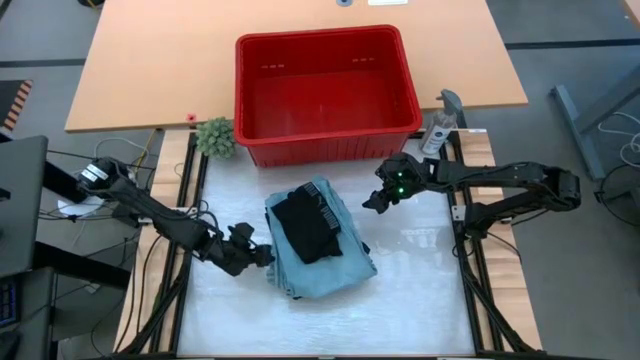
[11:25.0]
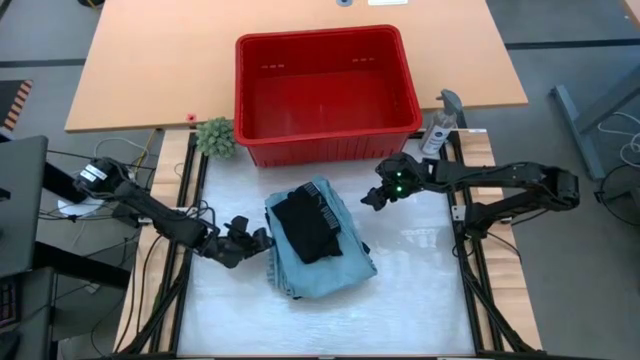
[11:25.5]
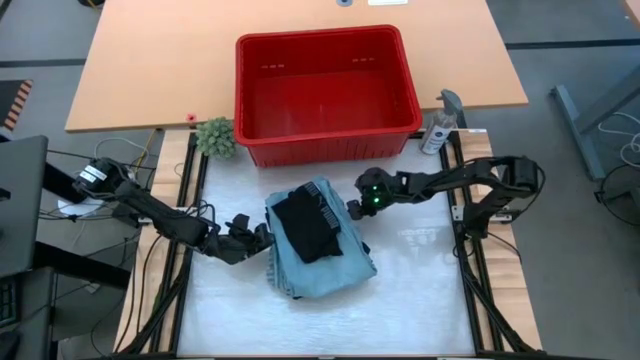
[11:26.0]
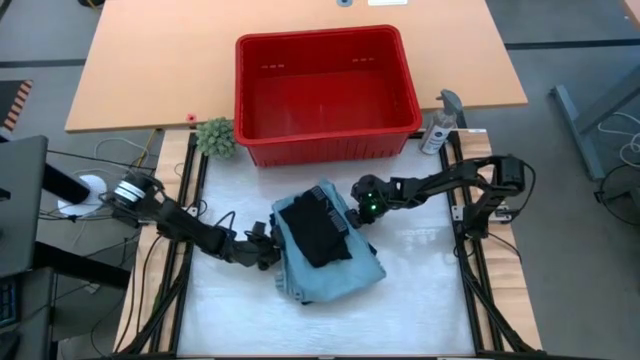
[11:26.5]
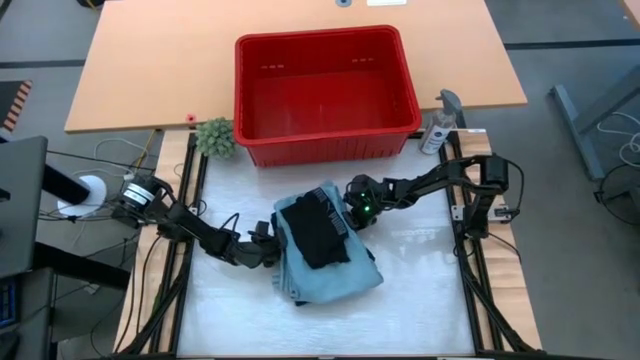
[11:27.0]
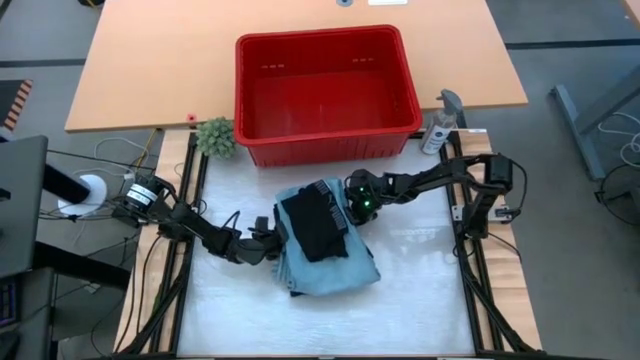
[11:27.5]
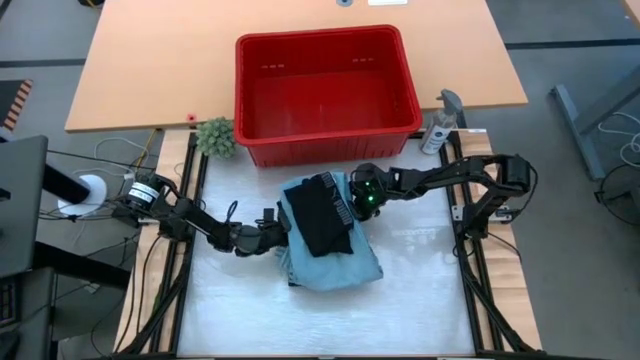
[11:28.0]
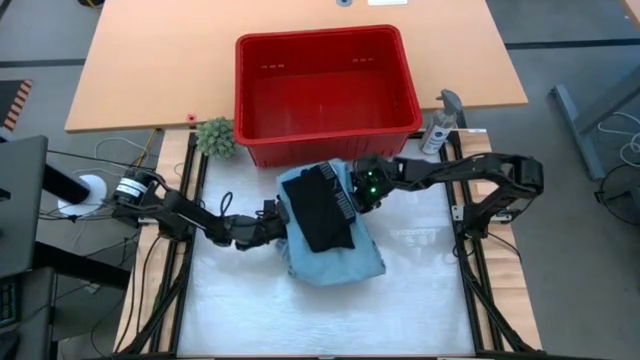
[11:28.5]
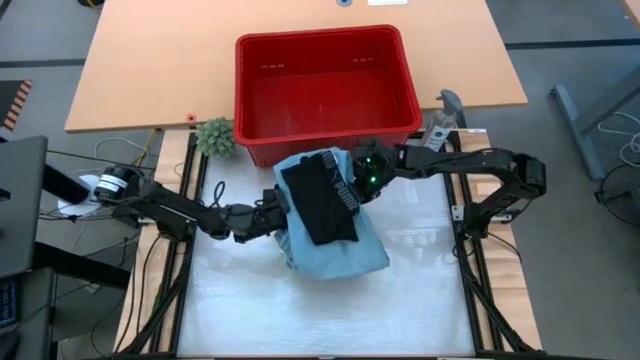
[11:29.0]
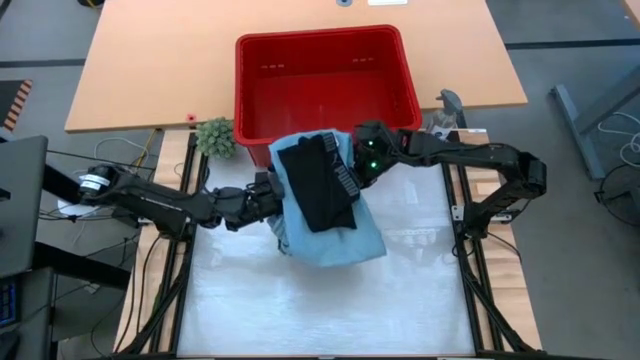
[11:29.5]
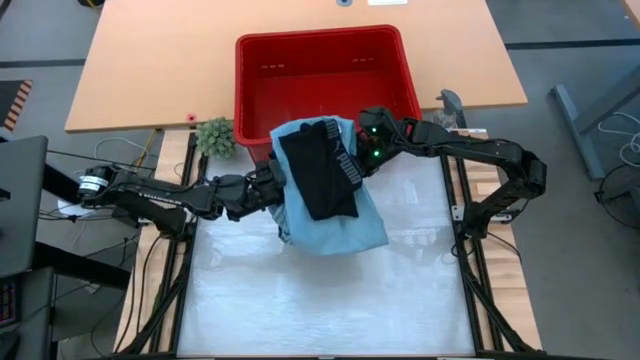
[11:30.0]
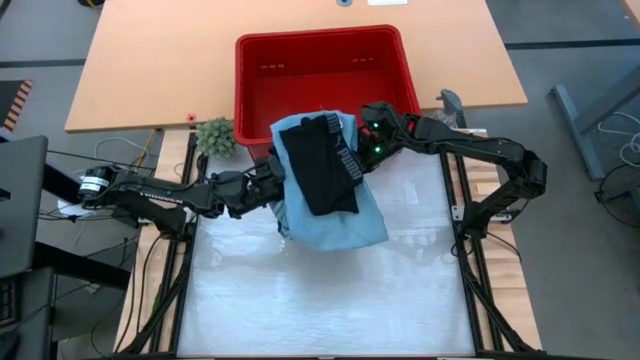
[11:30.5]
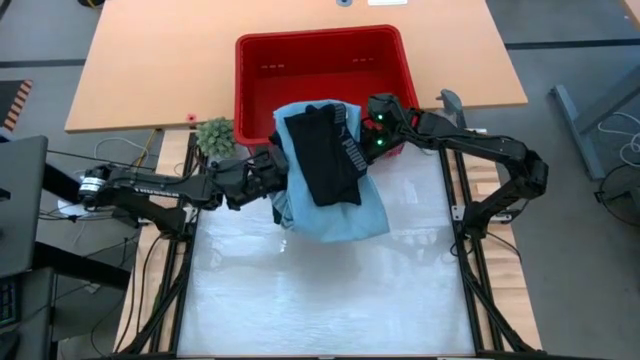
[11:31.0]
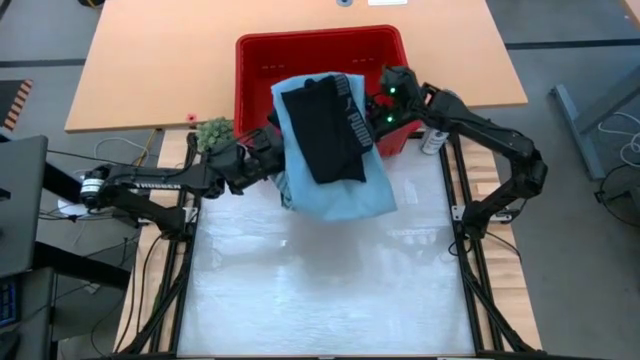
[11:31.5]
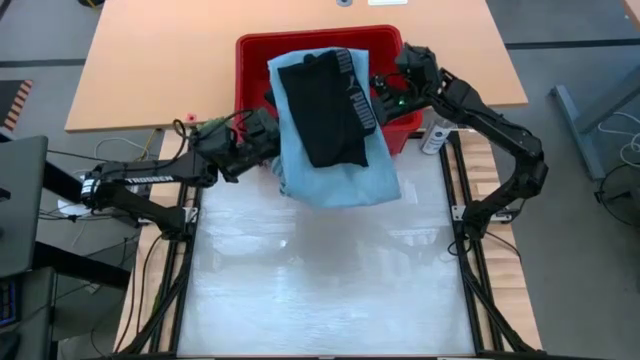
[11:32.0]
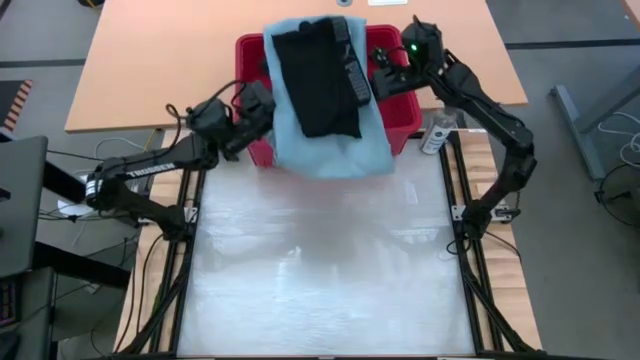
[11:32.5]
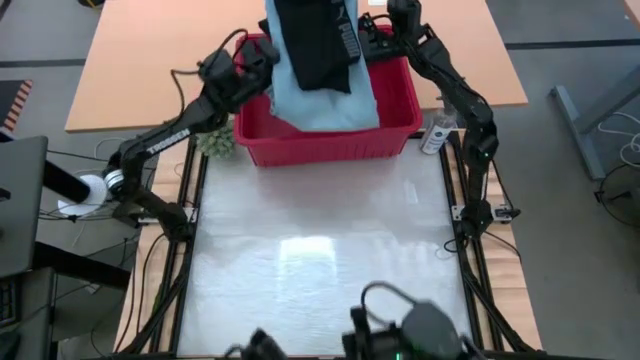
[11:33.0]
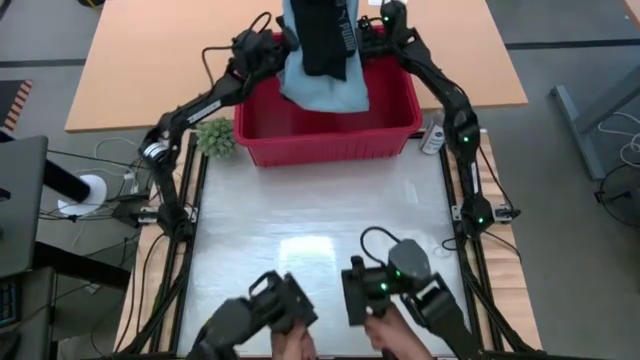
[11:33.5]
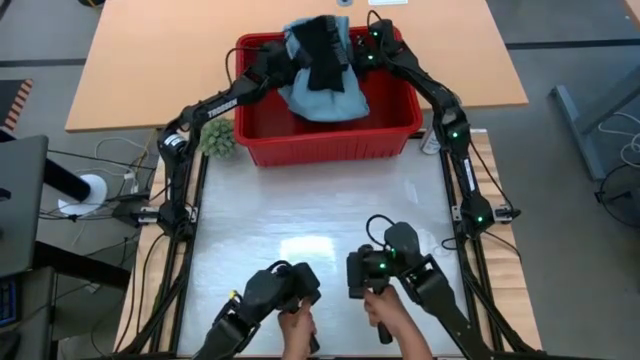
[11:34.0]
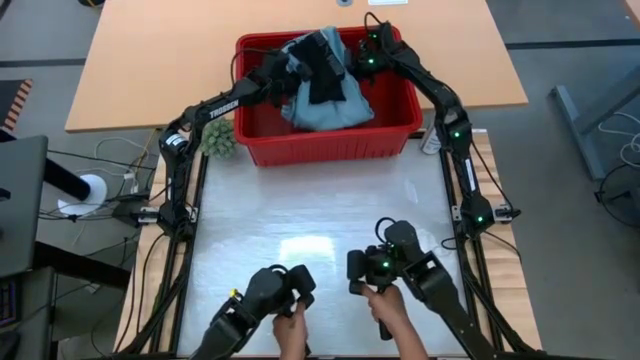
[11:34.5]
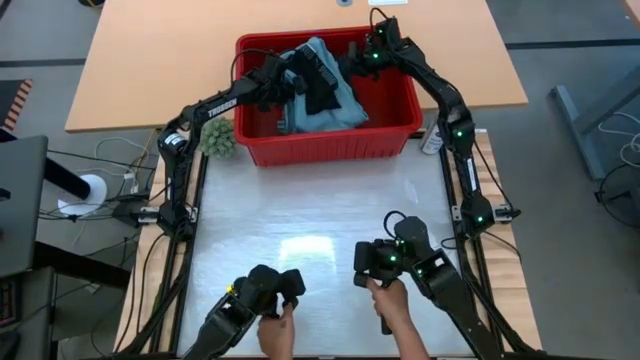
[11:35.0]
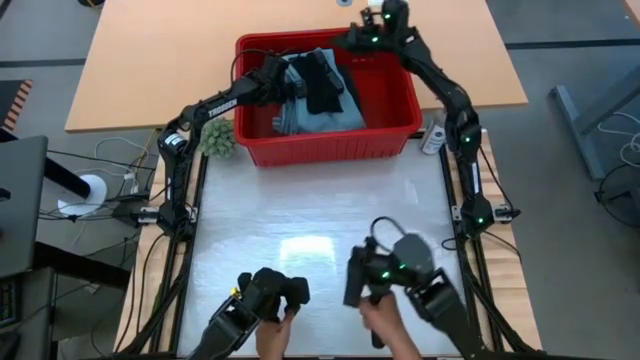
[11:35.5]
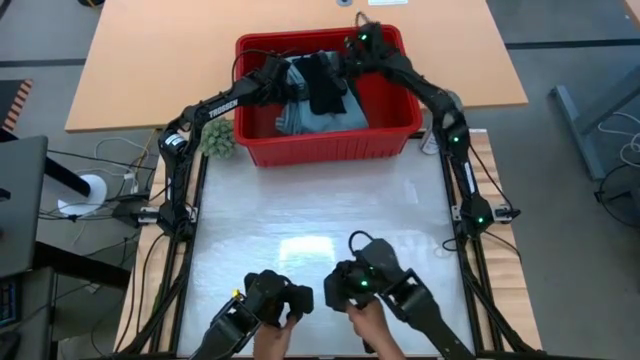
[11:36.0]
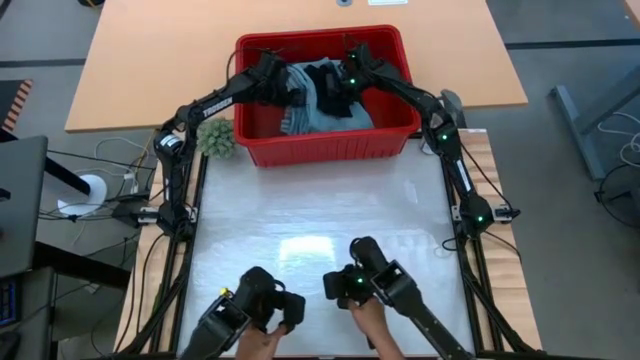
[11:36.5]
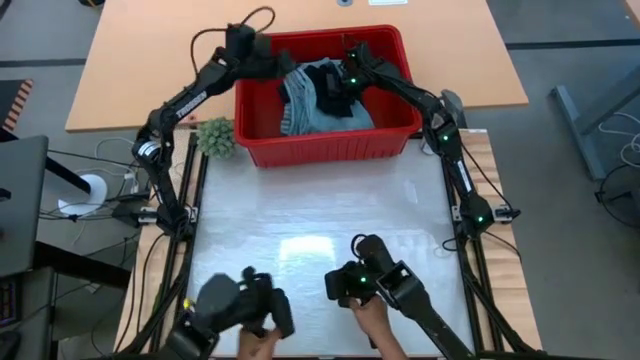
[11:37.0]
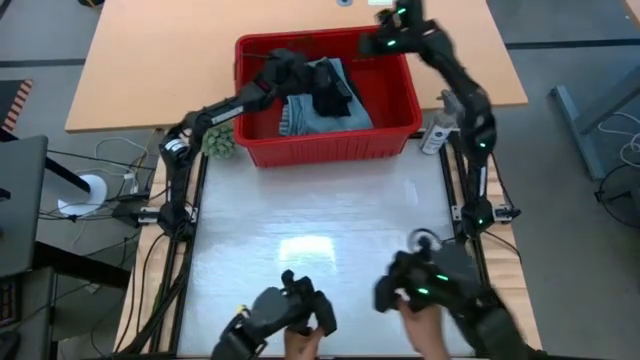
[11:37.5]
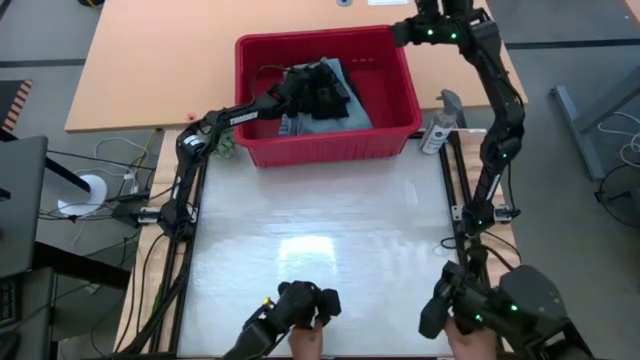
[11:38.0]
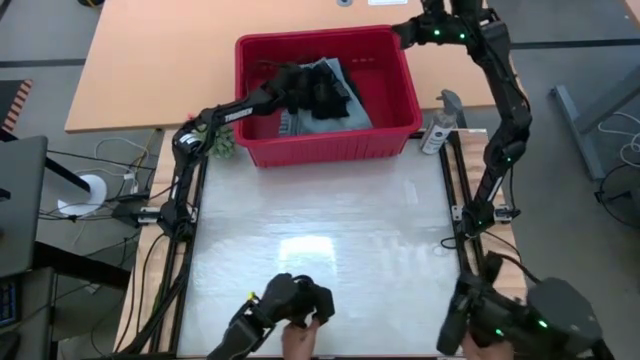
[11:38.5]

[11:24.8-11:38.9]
Task: Fold Laundry from Bin
Put the stacked clothes into the red laundry bin

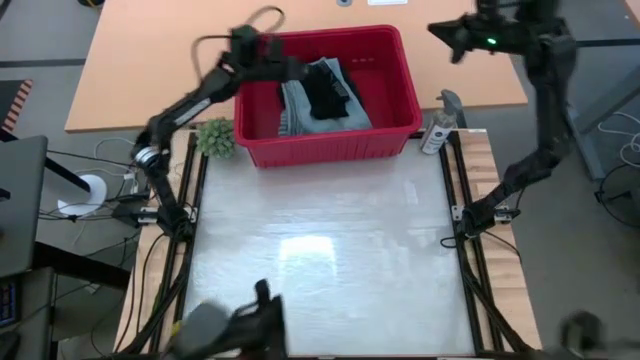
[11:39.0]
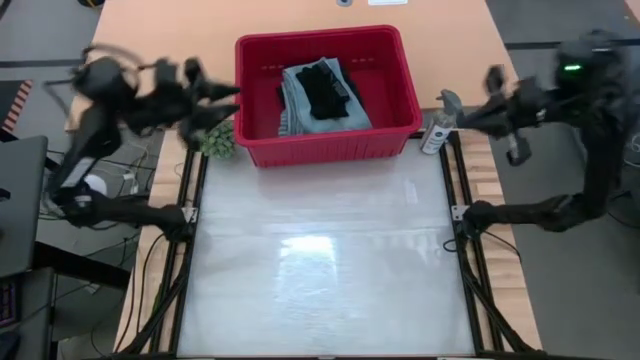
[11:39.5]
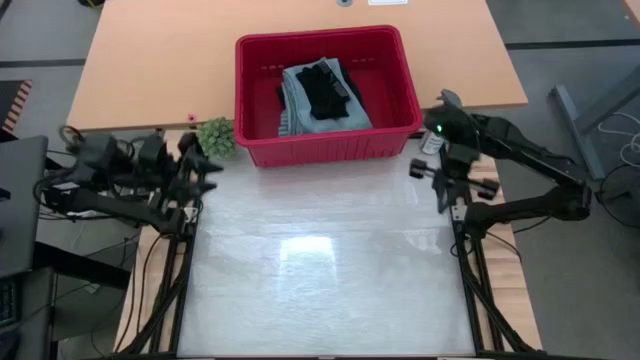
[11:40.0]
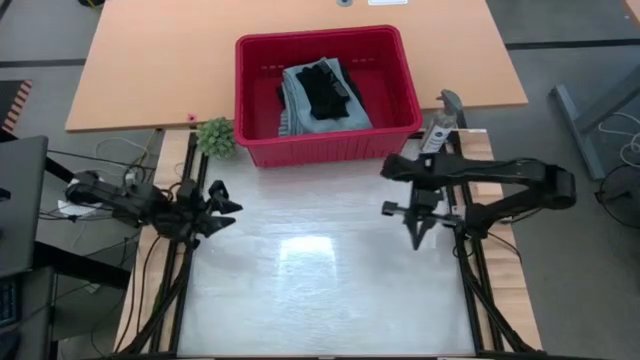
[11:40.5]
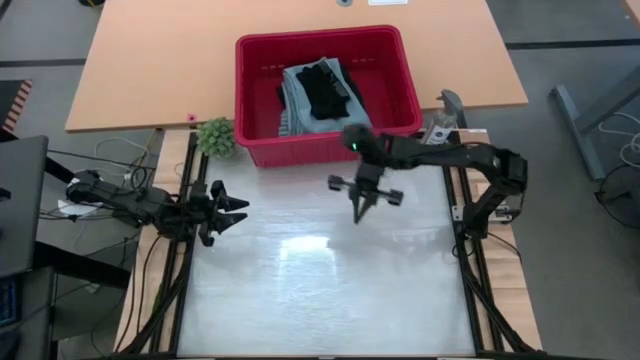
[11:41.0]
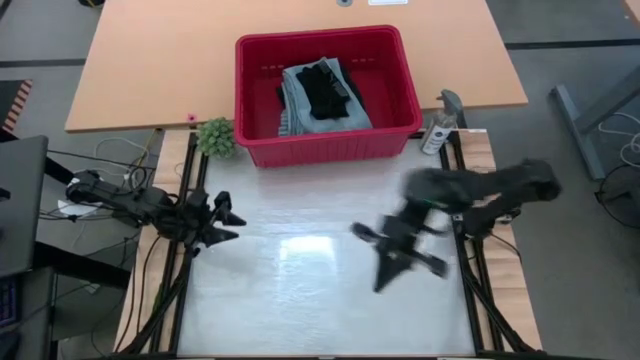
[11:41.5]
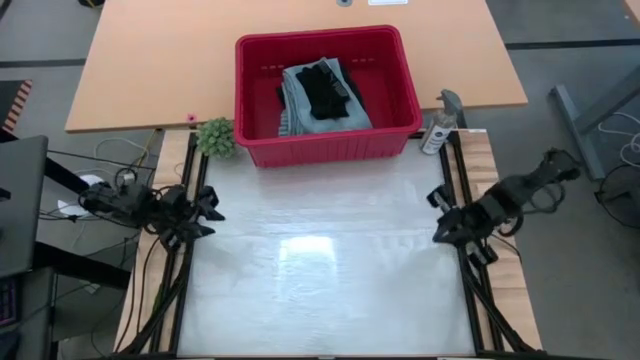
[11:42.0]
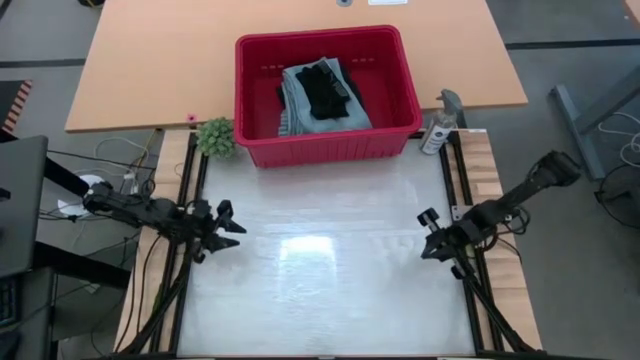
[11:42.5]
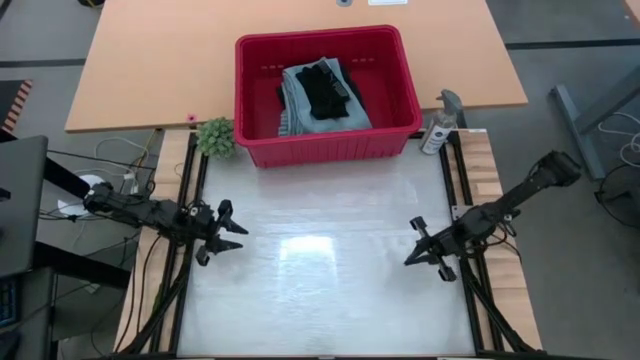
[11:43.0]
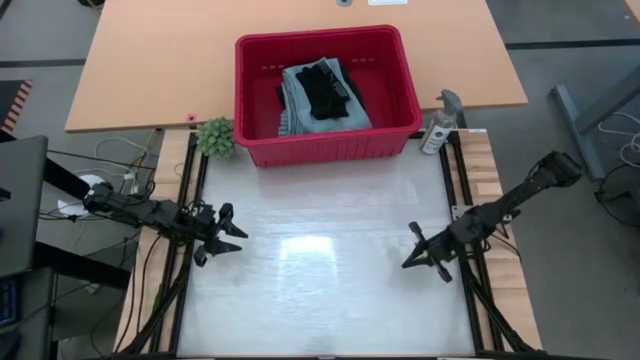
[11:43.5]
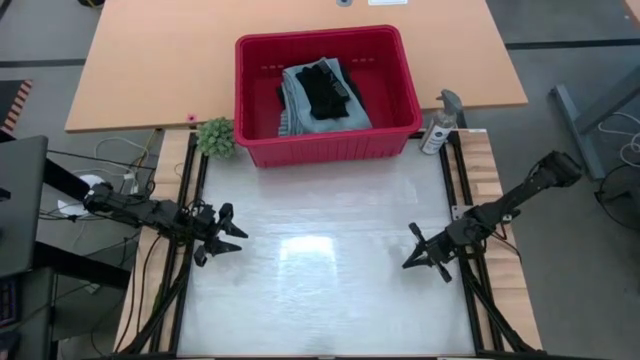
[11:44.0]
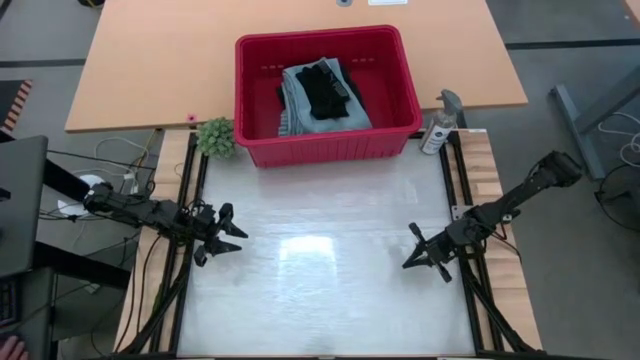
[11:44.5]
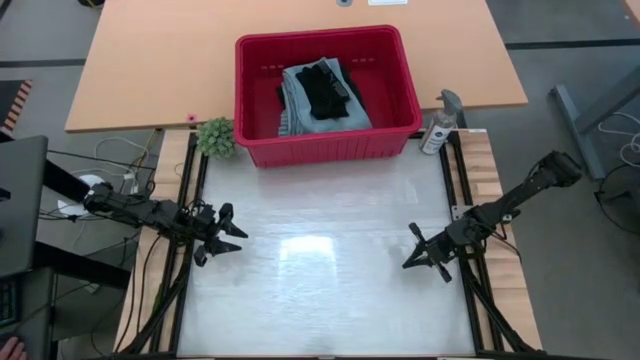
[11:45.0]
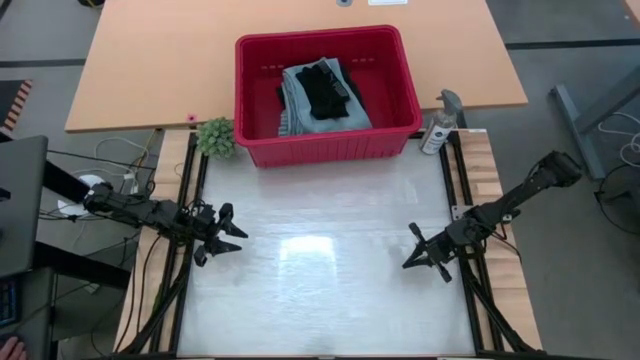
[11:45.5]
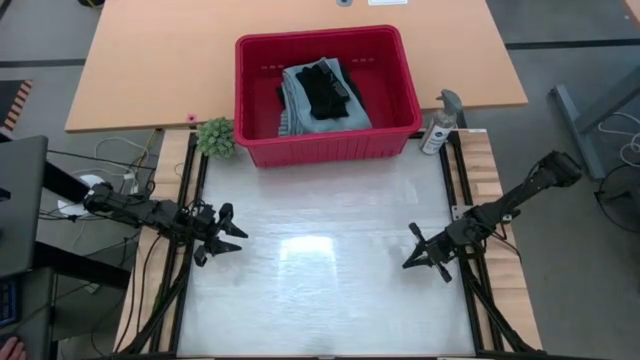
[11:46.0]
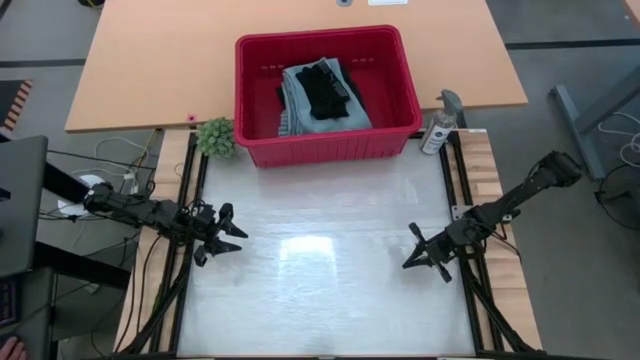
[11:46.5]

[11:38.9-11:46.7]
Return to Home Position
